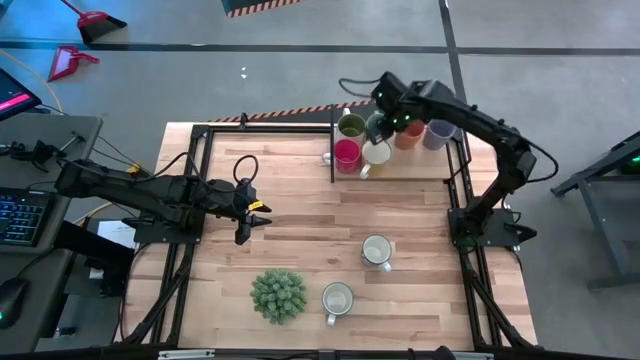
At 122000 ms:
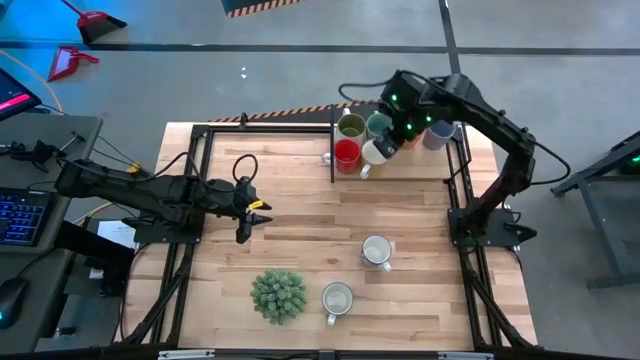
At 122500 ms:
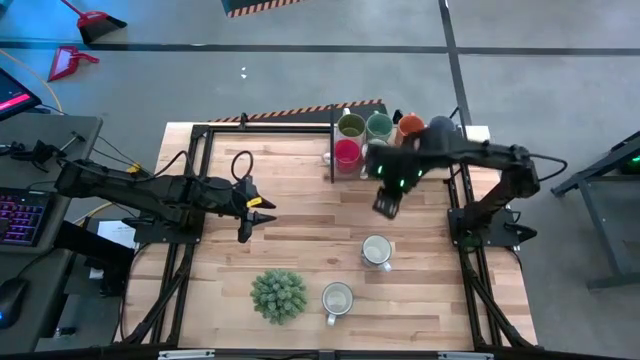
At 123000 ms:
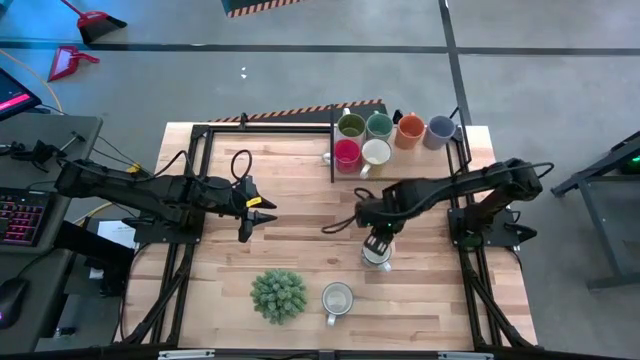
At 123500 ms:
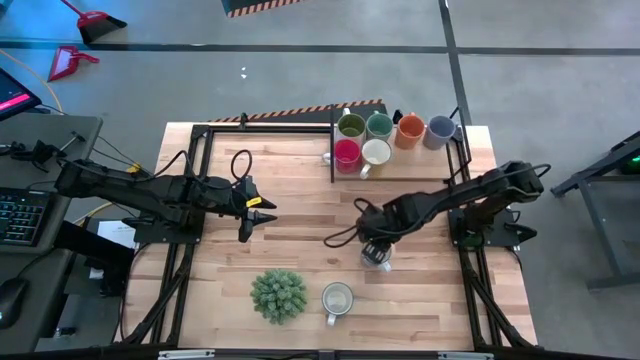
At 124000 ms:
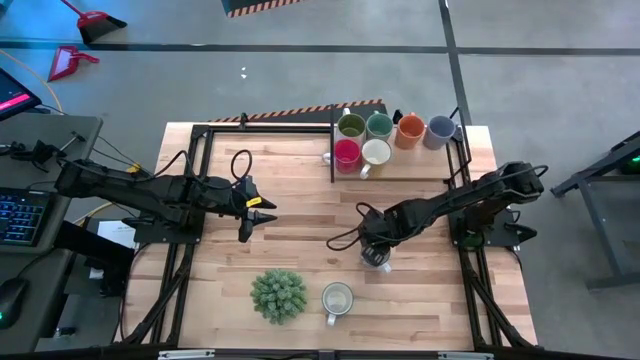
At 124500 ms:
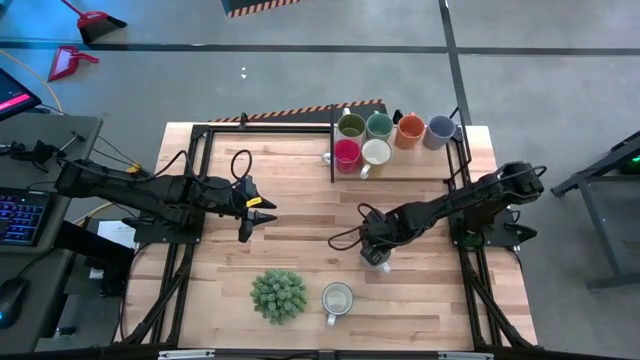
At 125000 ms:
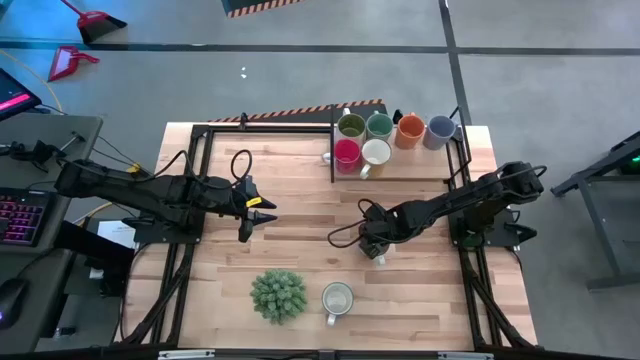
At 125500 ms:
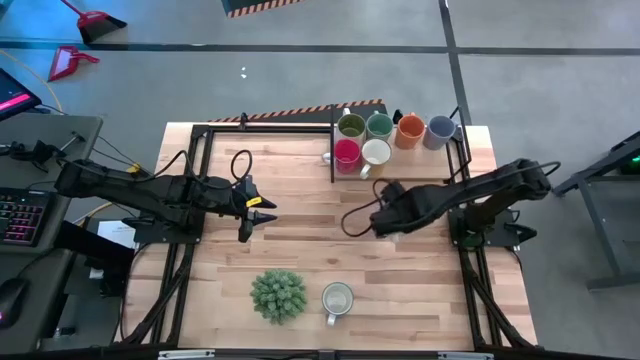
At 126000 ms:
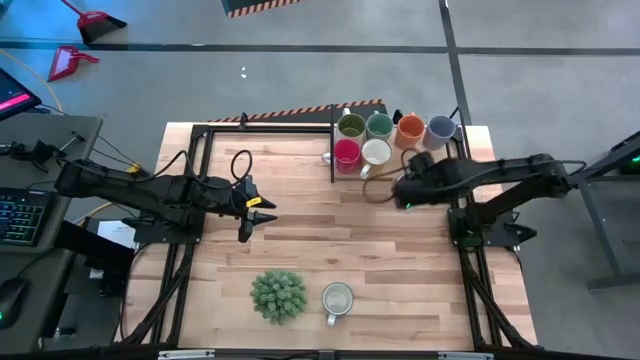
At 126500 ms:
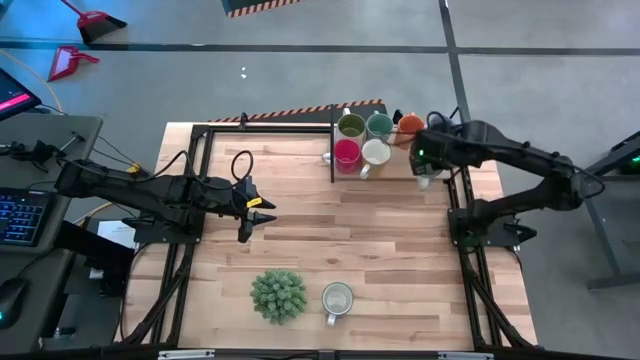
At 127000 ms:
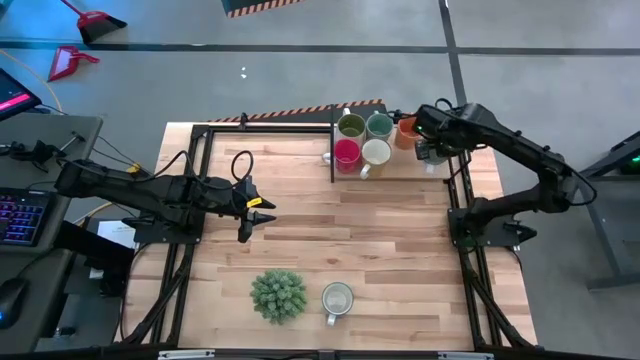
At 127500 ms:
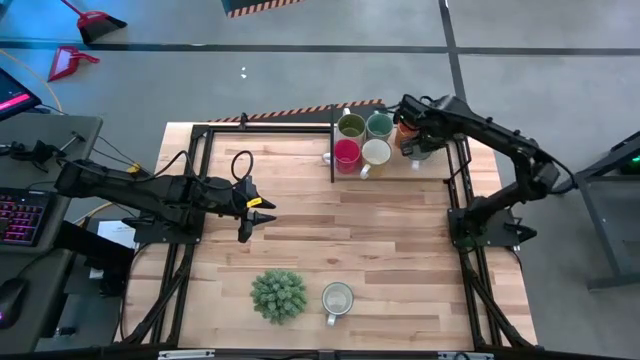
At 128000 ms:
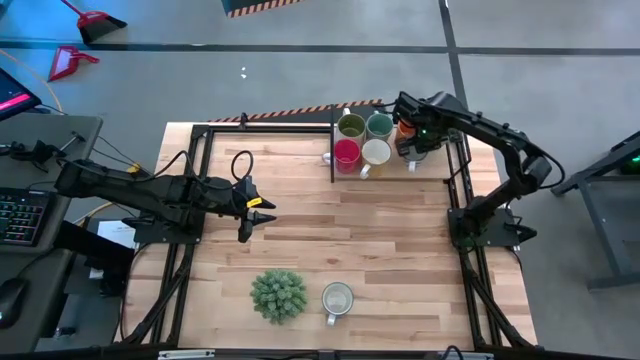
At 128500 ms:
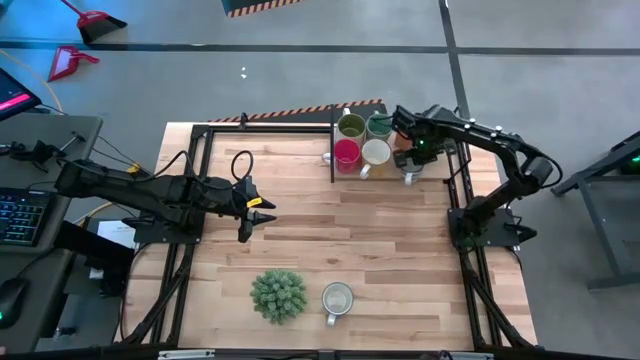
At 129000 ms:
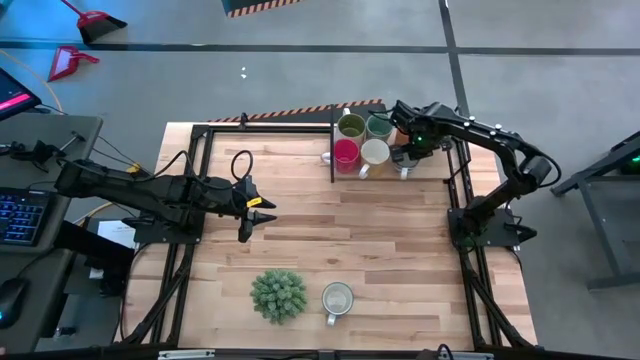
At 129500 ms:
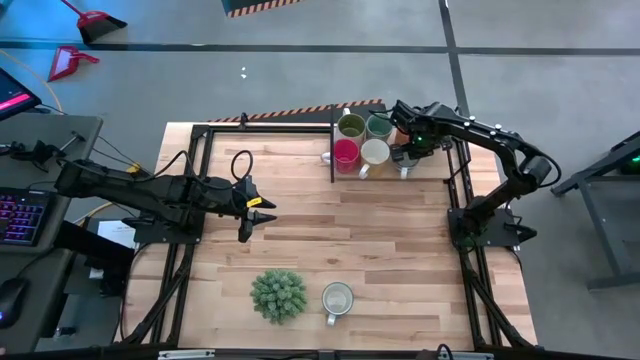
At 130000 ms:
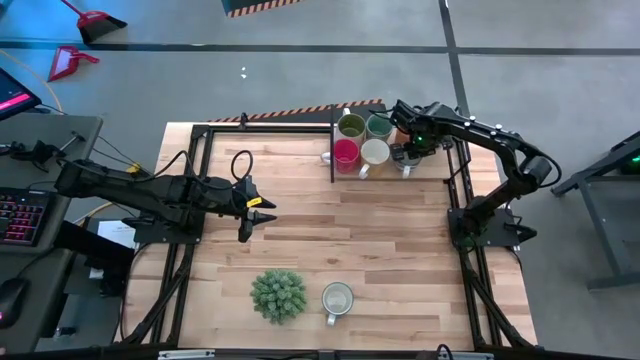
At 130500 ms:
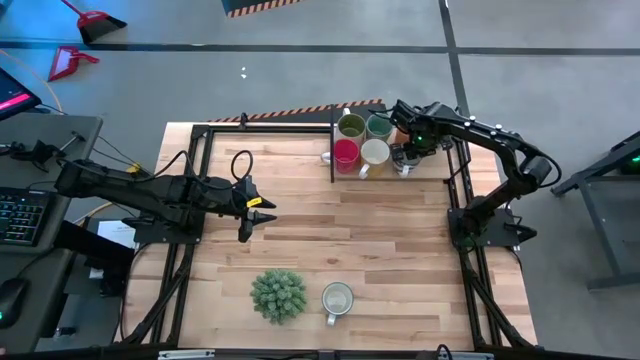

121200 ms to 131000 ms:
Task: Place coffee mugs
Put the blue mug on the shelf

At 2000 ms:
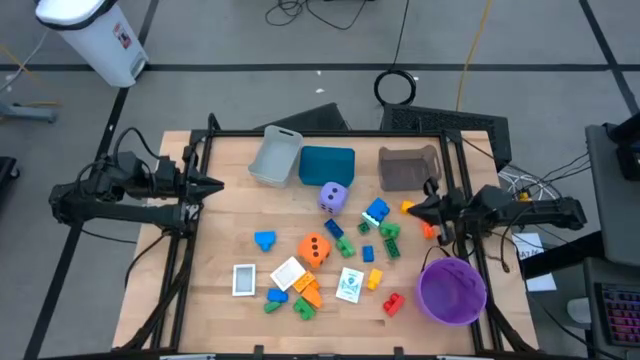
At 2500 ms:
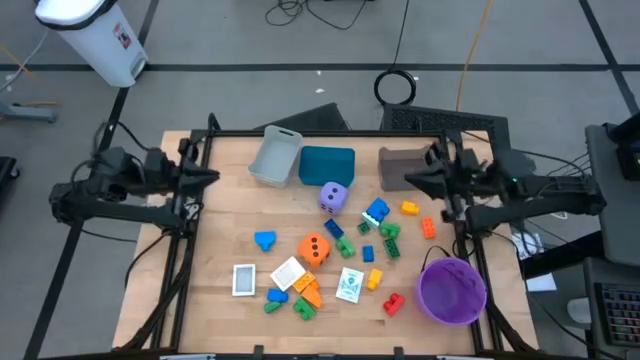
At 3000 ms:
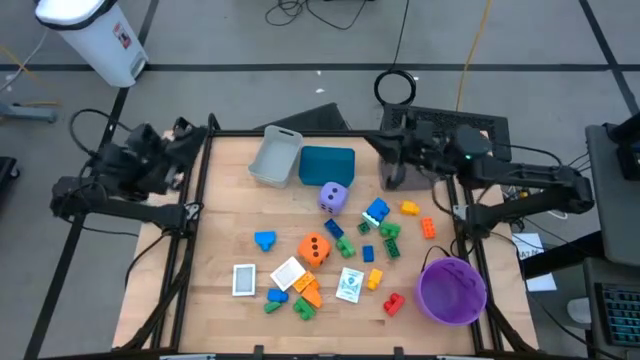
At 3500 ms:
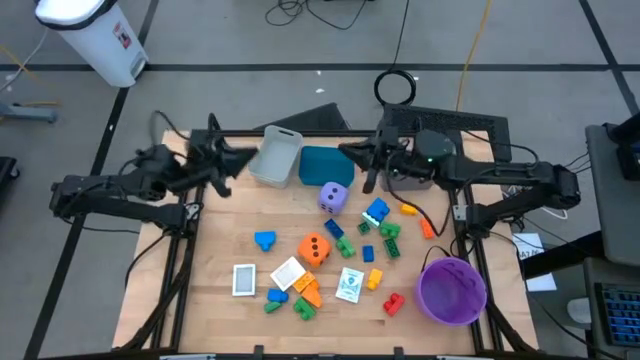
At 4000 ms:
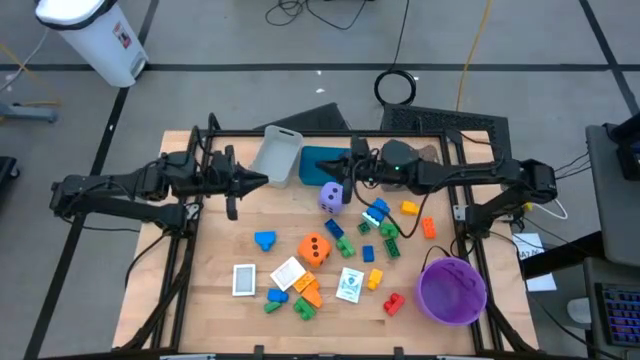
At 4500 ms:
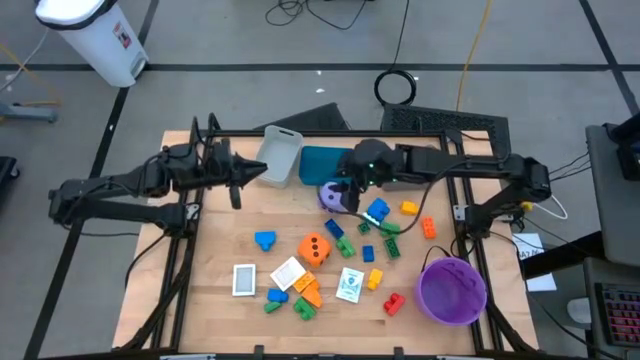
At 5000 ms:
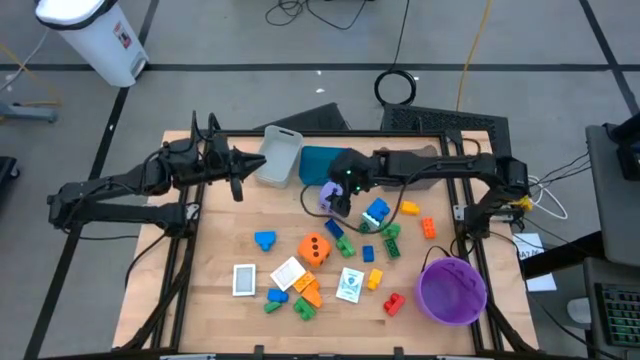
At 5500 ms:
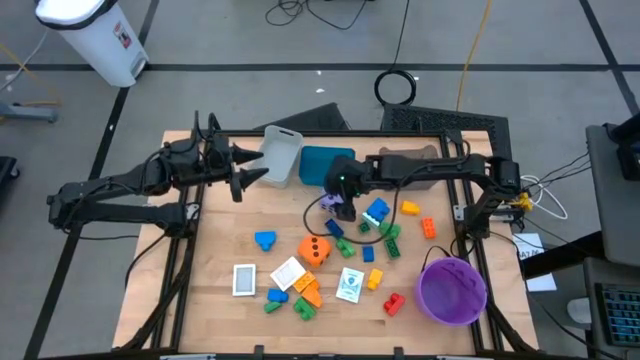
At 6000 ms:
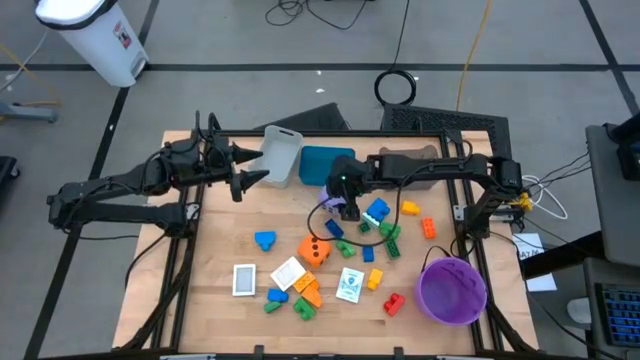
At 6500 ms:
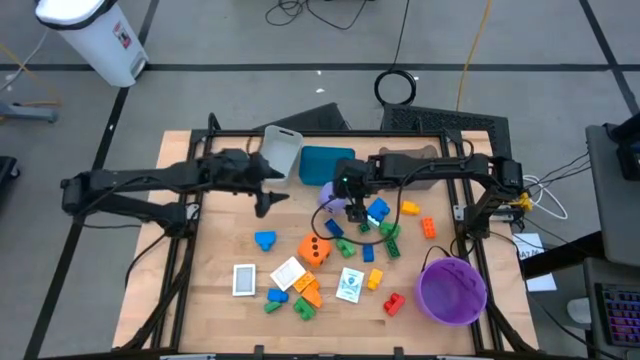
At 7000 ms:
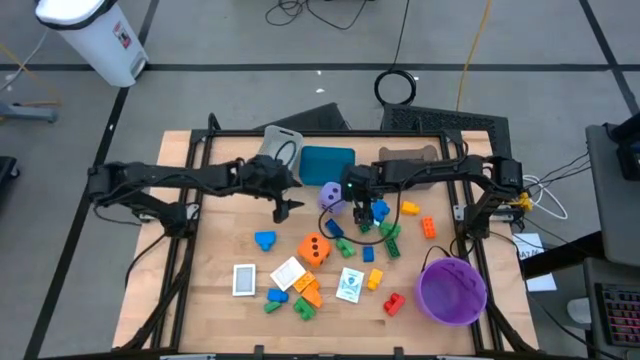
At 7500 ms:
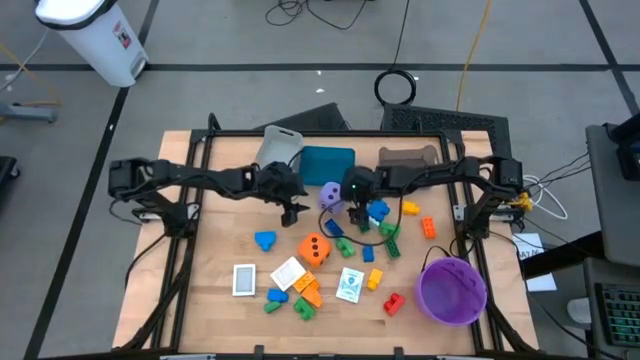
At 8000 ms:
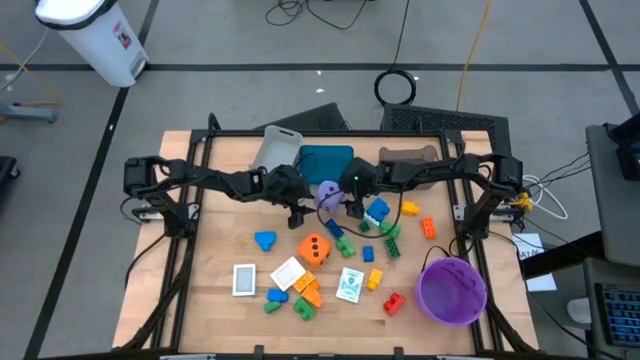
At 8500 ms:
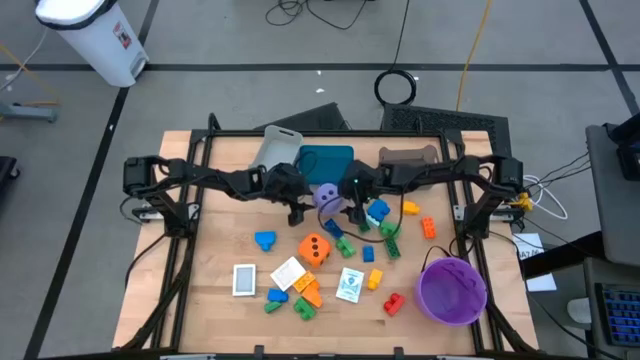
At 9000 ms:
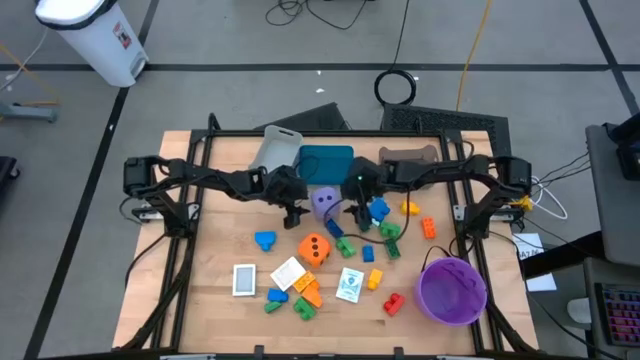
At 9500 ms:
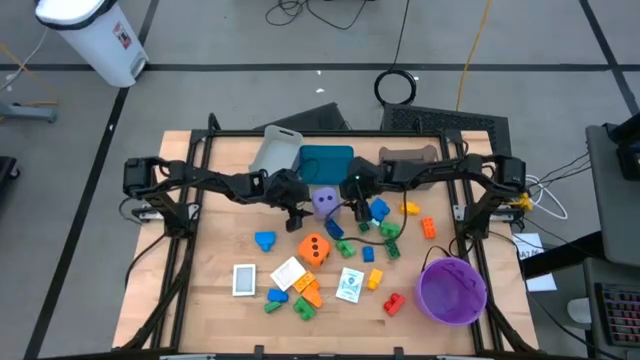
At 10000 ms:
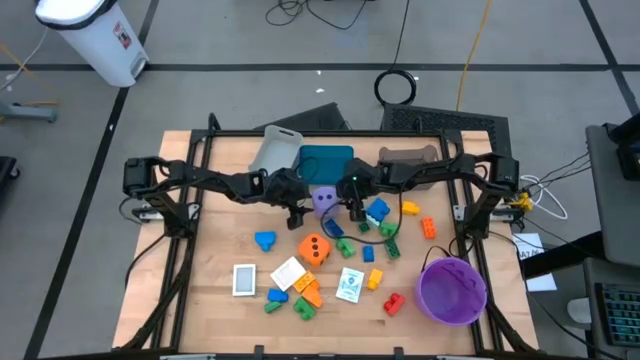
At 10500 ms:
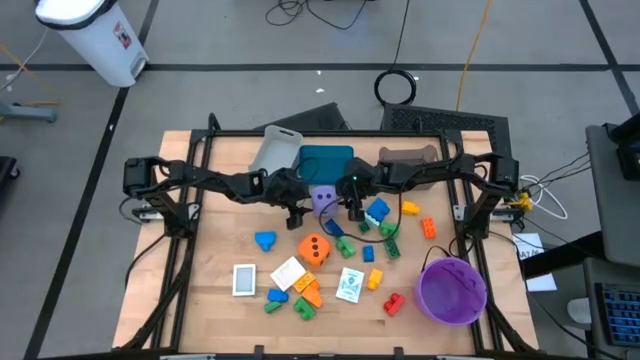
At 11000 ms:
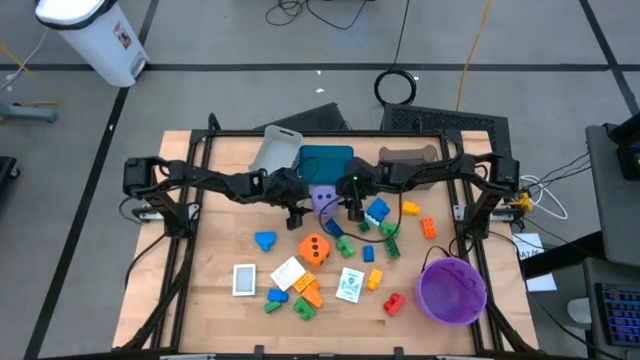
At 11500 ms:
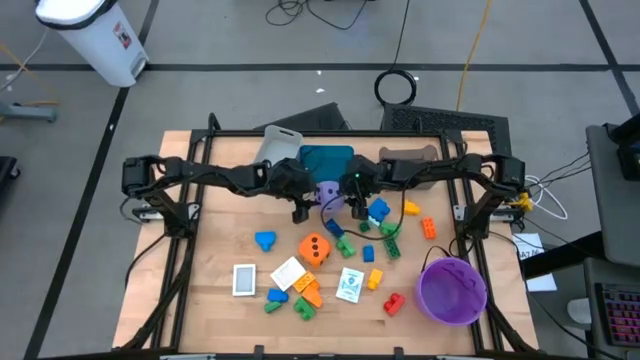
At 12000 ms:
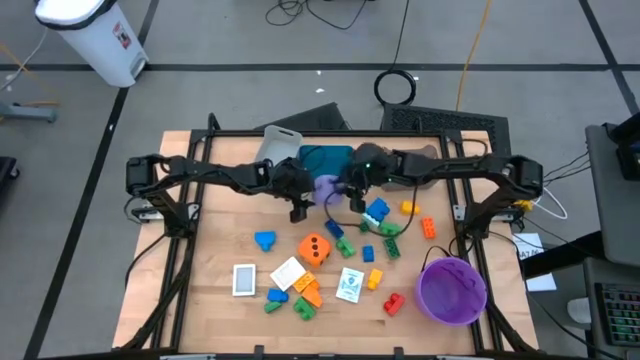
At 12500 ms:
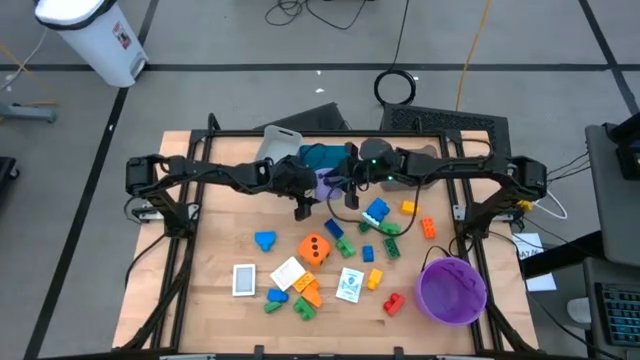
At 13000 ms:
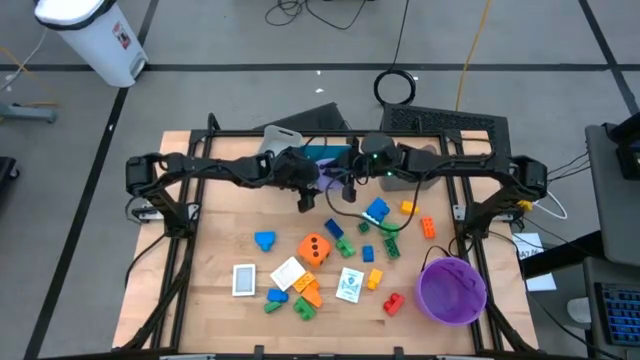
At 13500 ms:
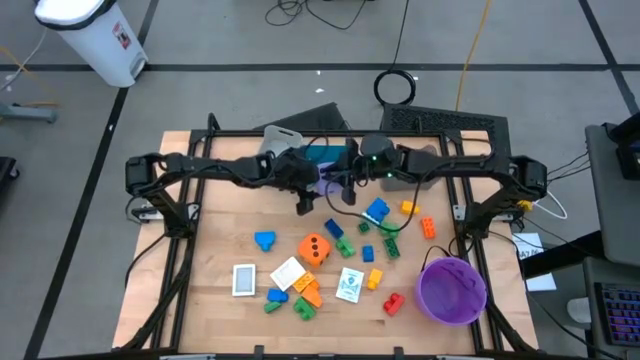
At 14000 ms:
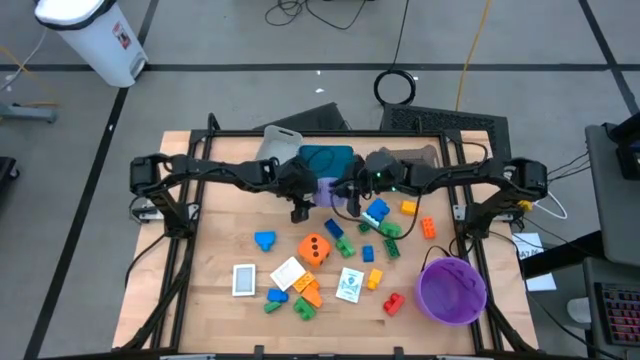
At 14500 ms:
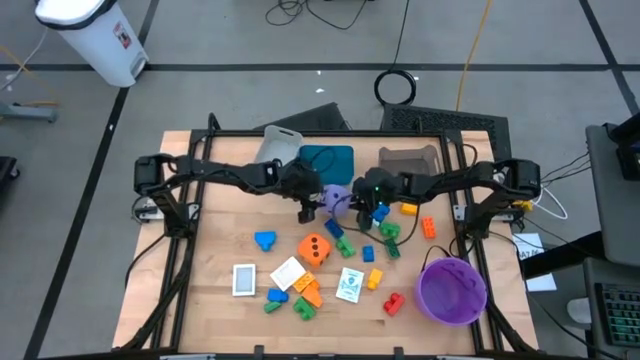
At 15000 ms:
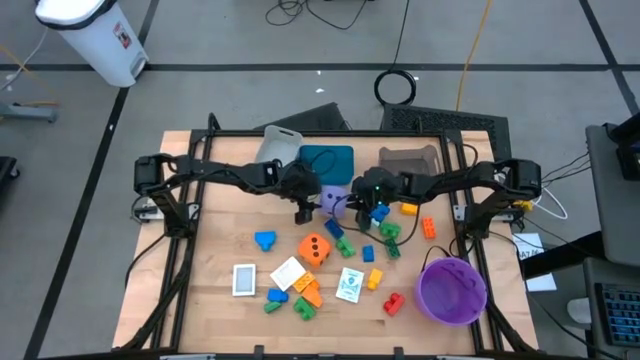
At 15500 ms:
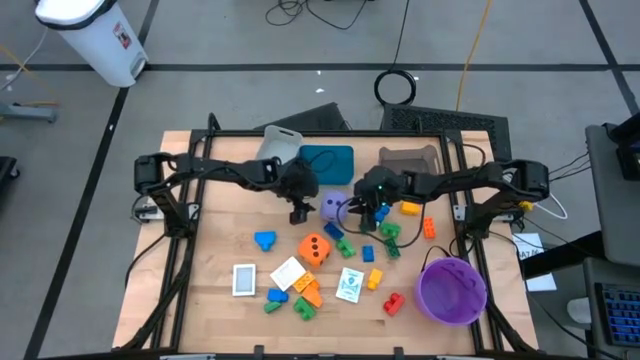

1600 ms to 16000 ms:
Task: Pick & Place Toys
Put the purple dice into the blue bin
